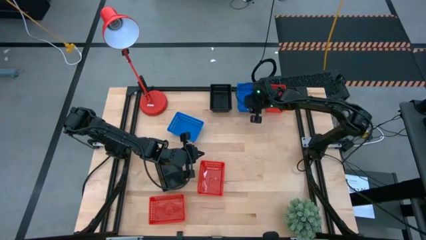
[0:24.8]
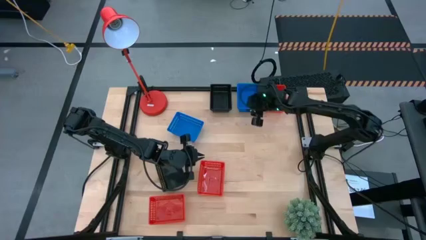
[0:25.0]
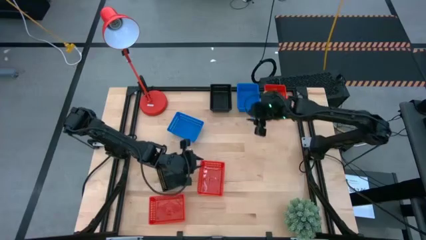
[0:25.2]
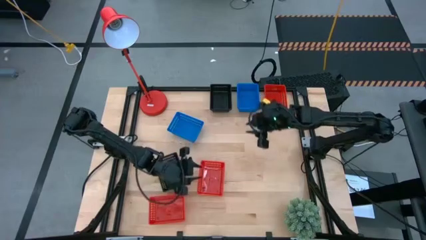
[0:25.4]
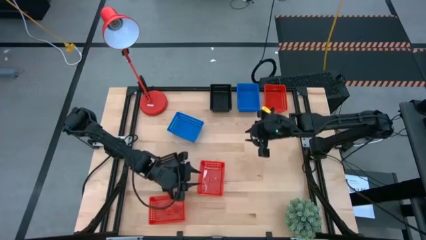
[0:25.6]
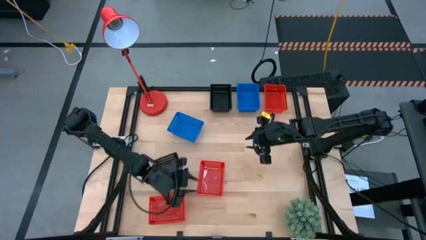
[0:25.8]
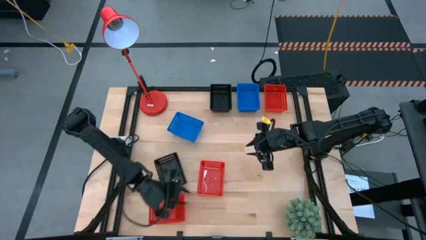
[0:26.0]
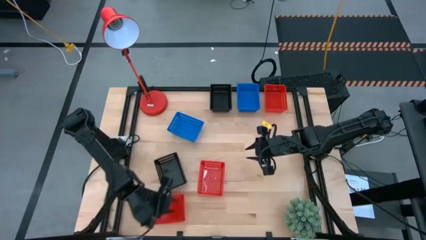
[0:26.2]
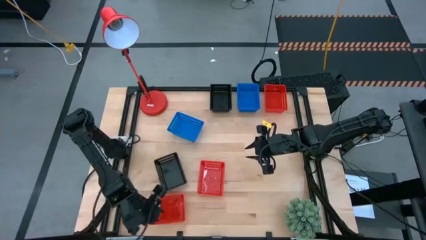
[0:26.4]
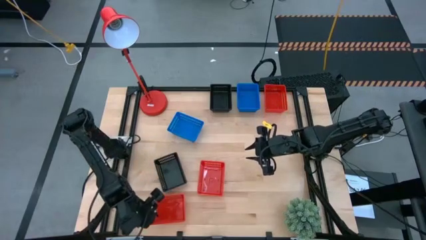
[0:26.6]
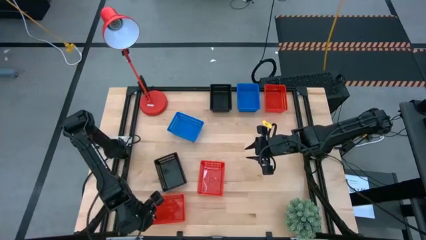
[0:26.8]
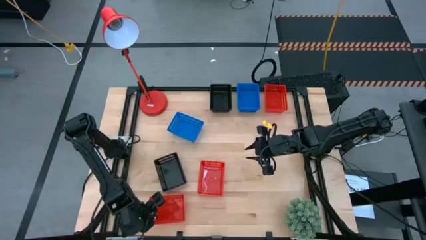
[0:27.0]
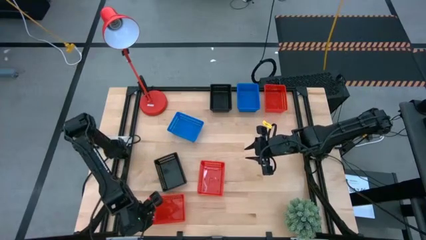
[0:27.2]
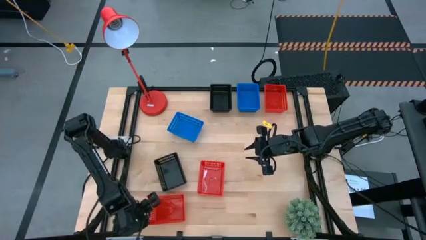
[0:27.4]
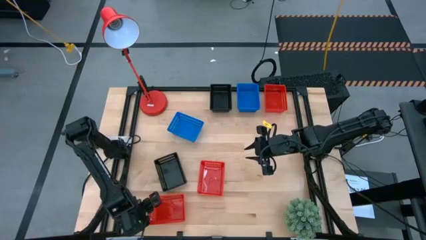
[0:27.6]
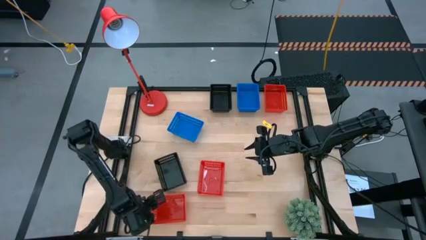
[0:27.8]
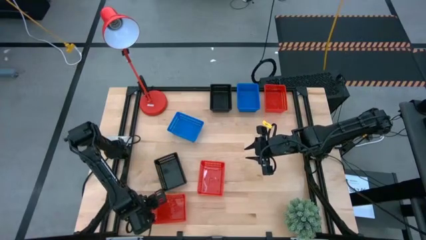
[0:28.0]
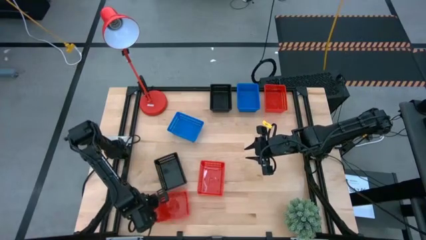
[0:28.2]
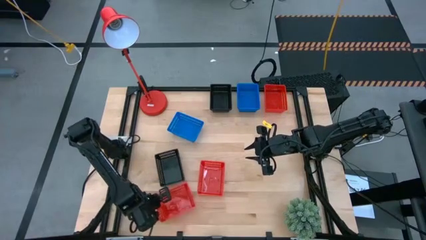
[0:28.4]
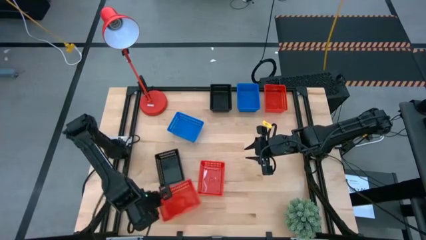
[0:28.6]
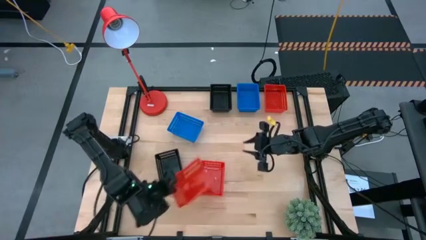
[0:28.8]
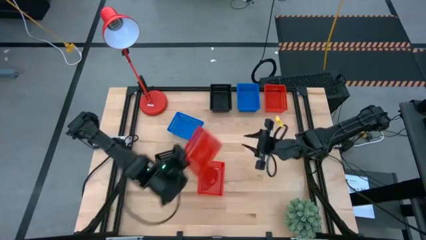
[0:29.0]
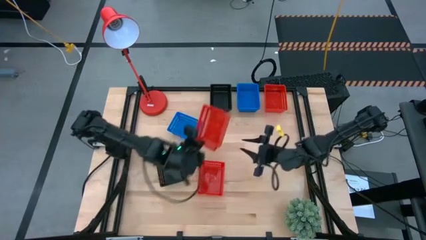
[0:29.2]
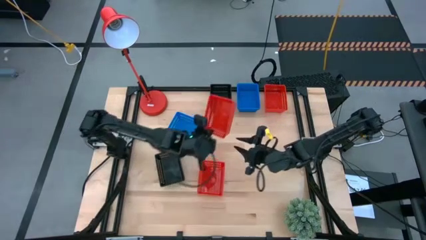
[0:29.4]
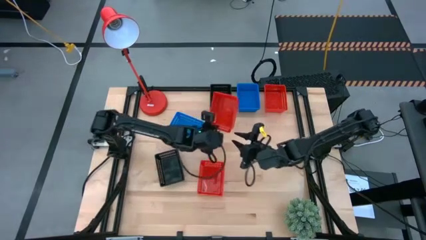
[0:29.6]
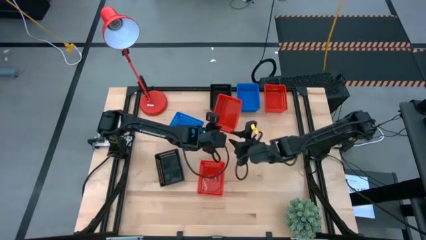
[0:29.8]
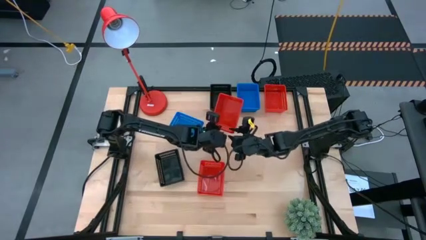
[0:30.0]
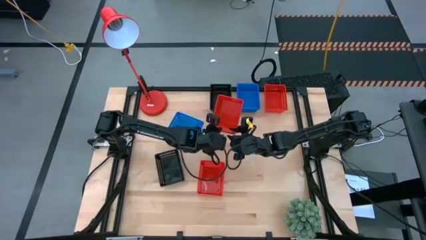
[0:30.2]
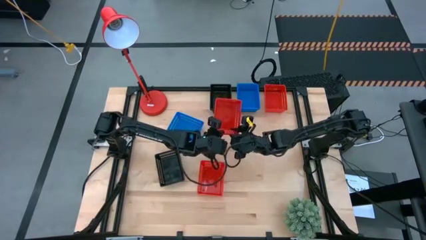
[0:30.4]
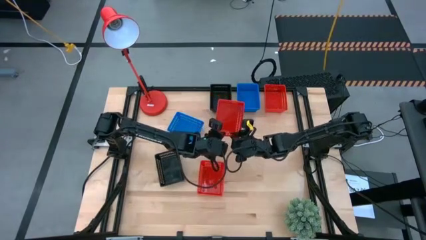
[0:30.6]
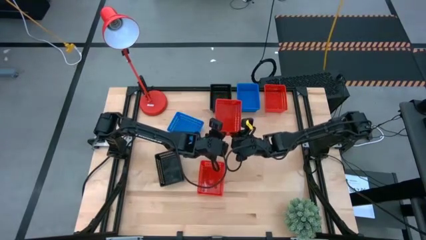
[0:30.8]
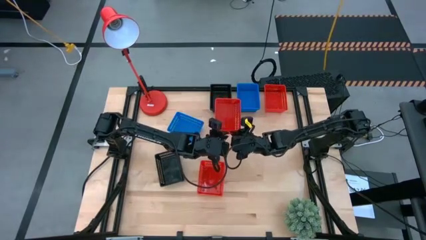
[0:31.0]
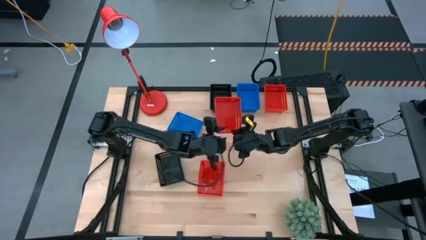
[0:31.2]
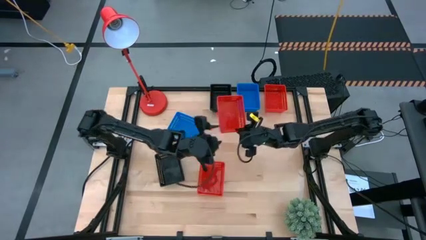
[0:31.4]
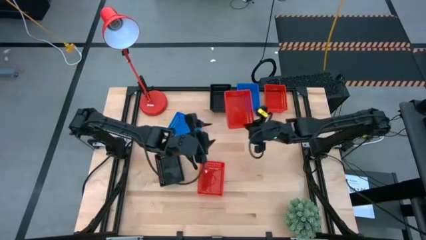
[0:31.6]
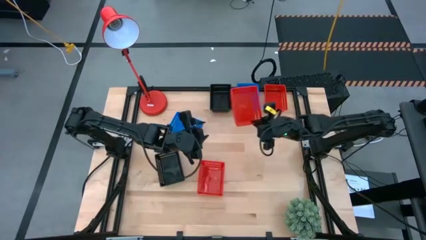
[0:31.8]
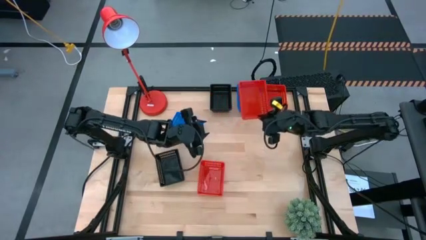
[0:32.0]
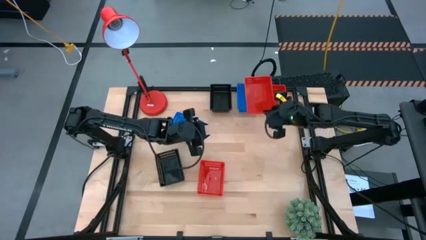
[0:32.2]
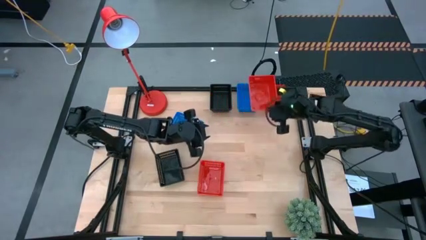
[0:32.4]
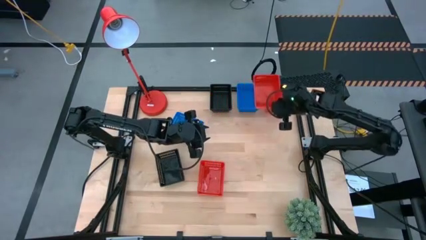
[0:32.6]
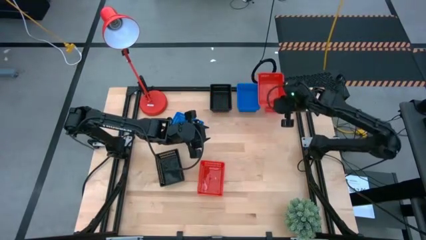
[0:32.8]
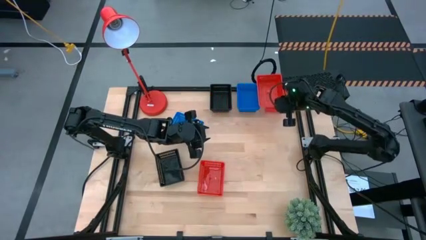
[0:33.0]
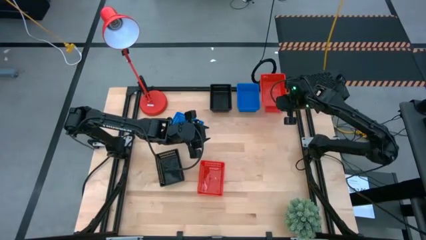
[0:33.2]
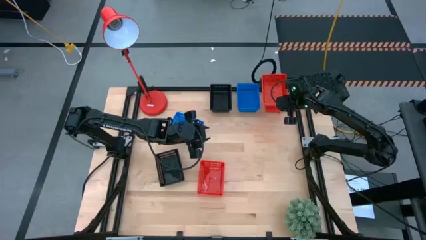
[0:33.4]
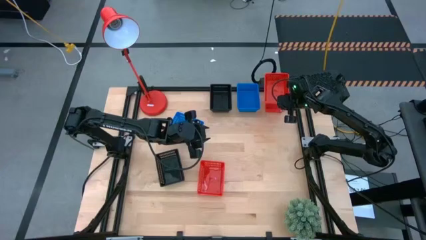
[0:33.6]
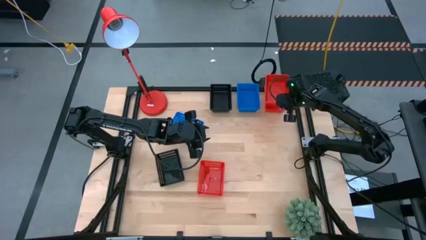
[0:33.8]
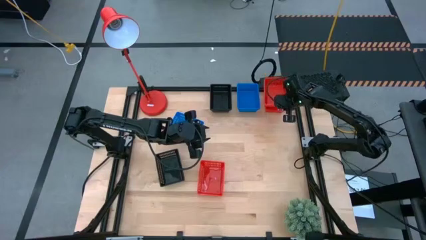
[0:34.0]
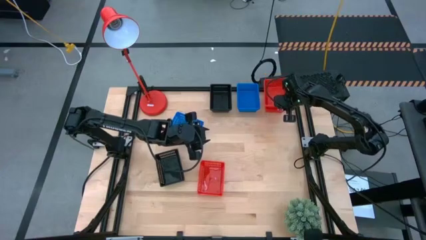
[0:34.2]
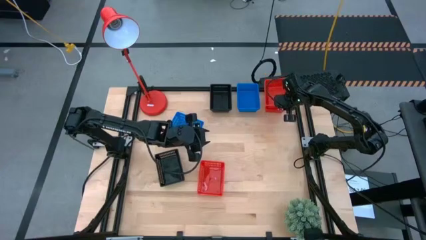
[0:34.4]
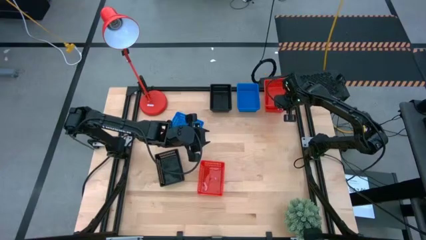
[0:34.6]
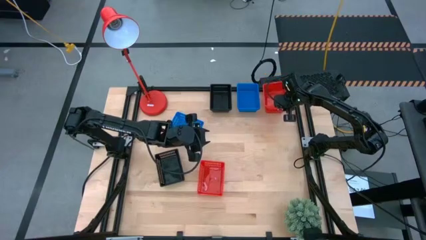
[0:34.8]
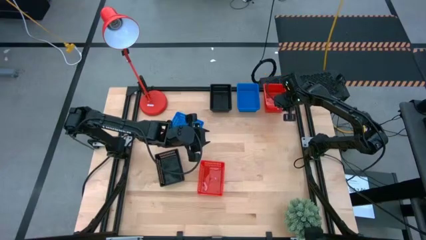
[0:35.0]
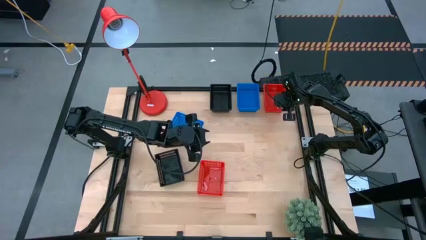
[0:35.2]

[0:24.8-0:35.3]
Stack the bottom red basket on top of the top red basket

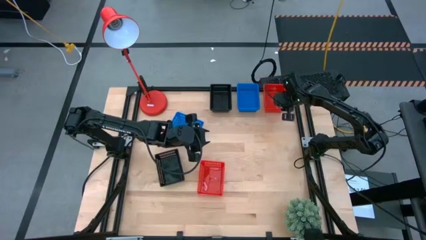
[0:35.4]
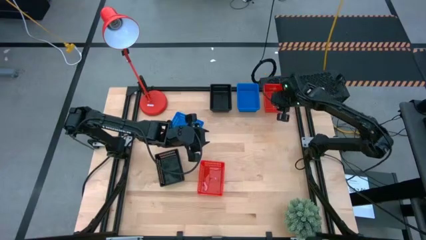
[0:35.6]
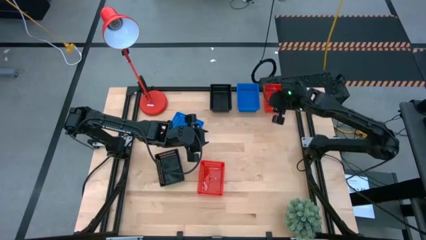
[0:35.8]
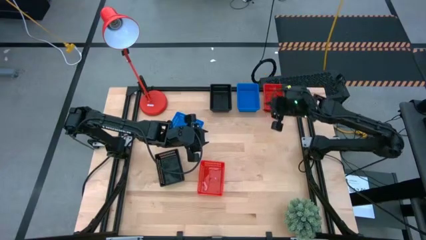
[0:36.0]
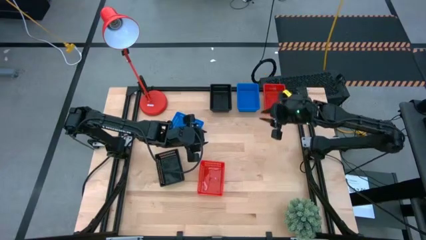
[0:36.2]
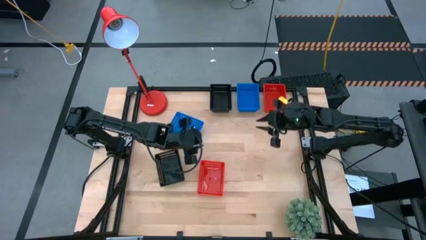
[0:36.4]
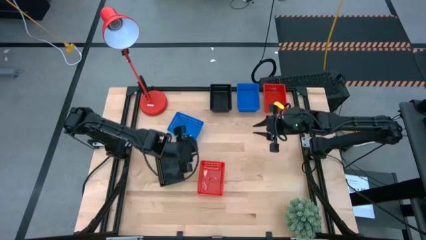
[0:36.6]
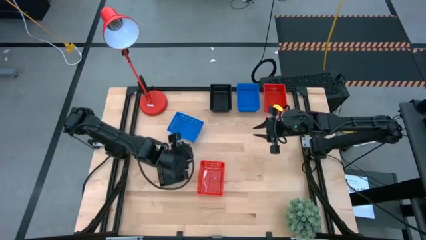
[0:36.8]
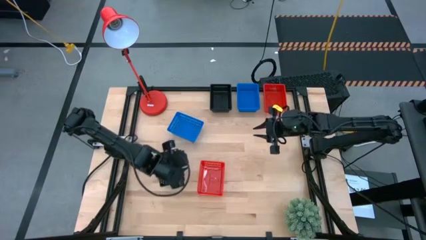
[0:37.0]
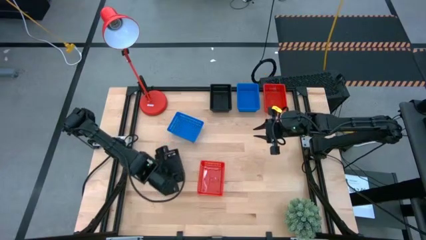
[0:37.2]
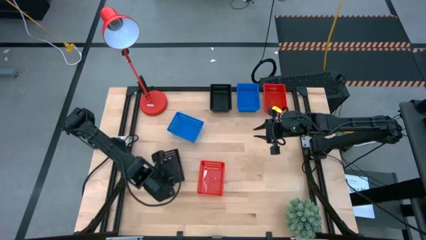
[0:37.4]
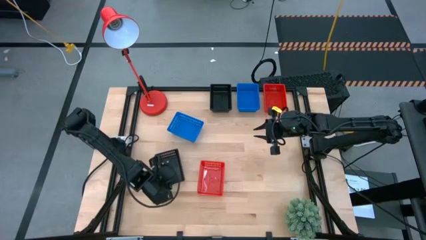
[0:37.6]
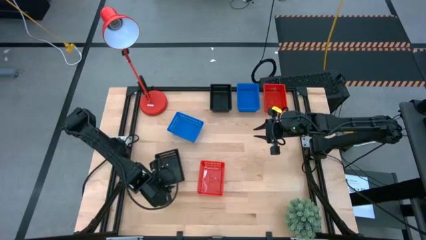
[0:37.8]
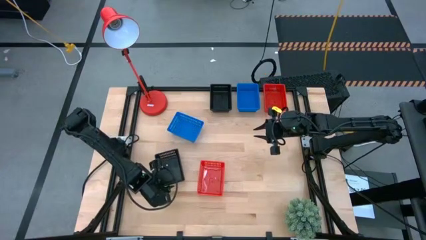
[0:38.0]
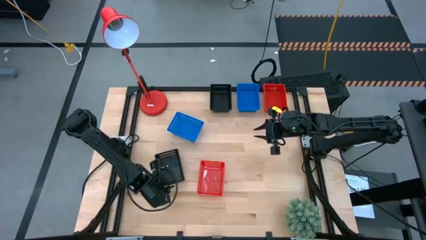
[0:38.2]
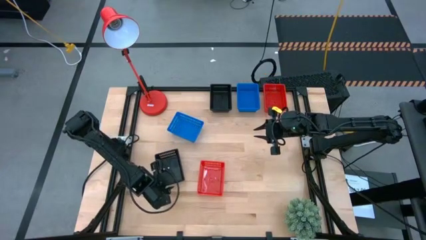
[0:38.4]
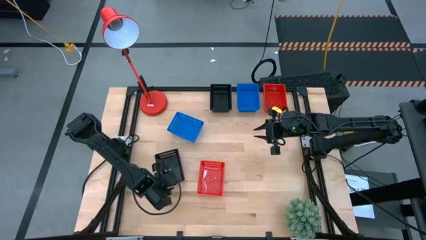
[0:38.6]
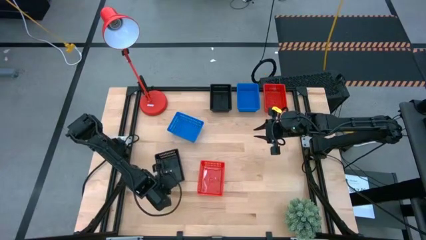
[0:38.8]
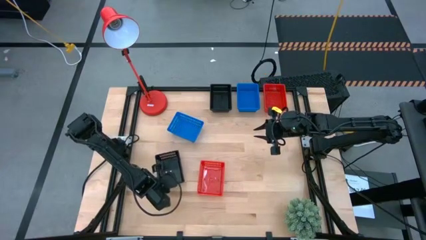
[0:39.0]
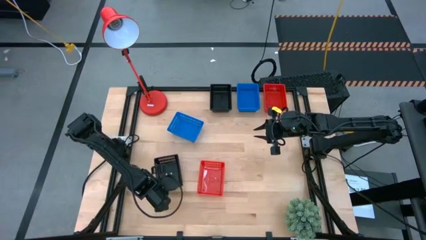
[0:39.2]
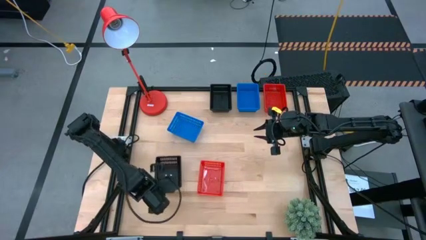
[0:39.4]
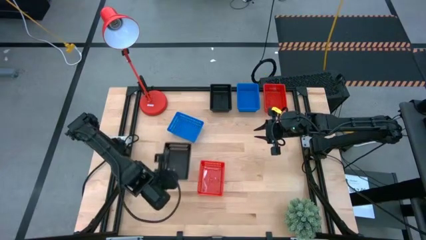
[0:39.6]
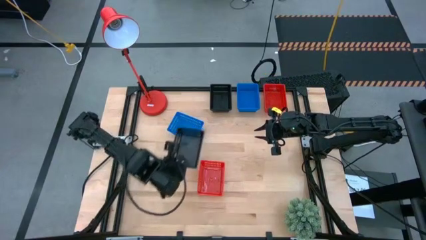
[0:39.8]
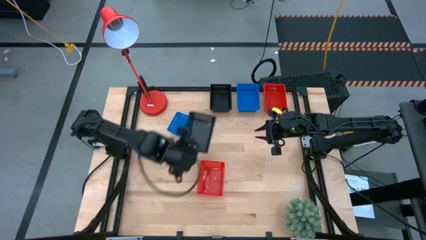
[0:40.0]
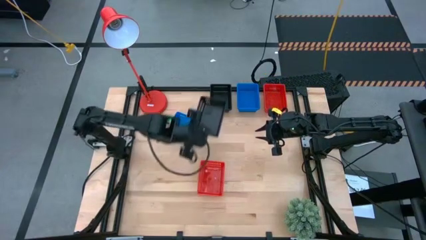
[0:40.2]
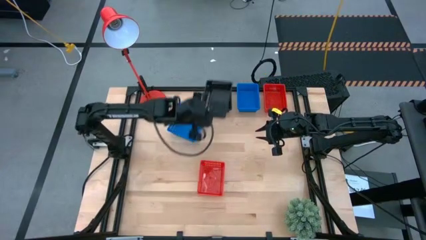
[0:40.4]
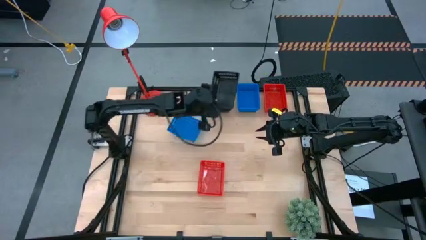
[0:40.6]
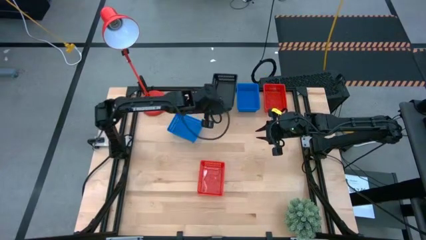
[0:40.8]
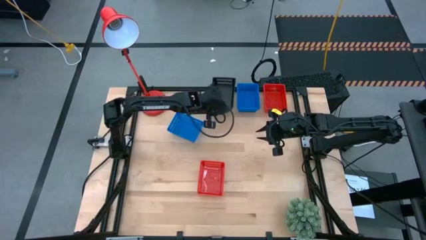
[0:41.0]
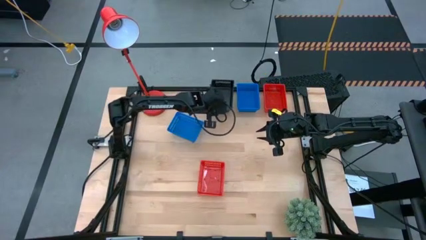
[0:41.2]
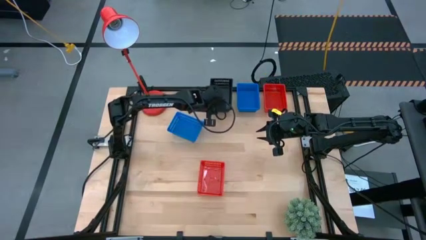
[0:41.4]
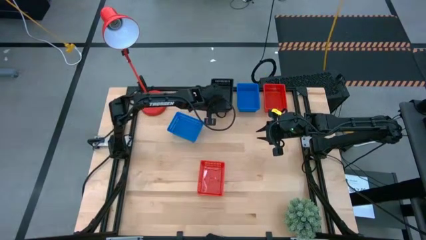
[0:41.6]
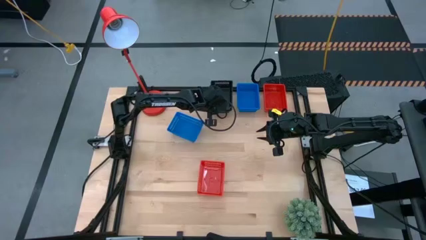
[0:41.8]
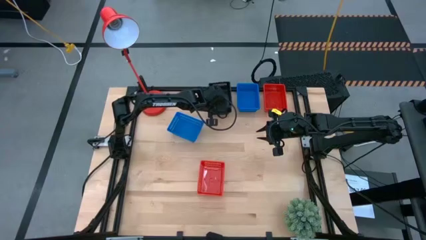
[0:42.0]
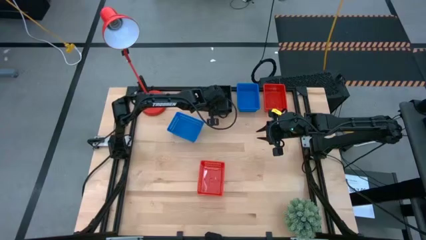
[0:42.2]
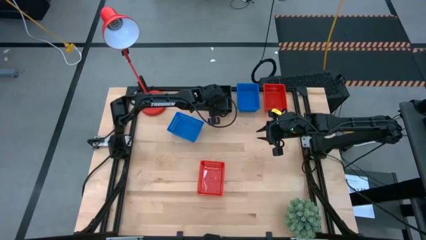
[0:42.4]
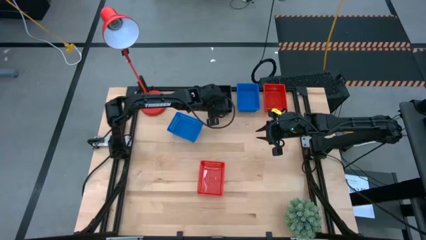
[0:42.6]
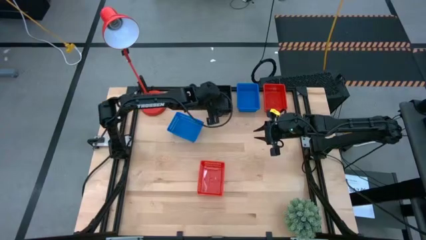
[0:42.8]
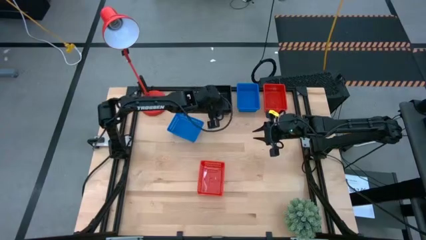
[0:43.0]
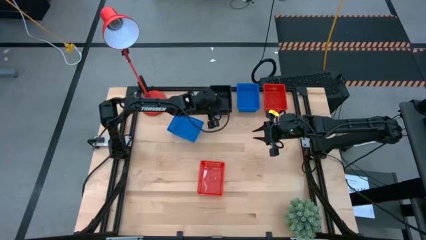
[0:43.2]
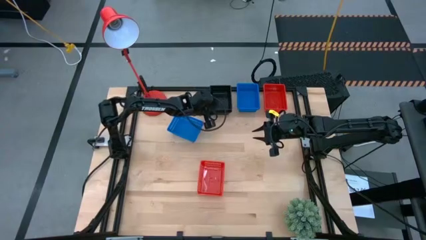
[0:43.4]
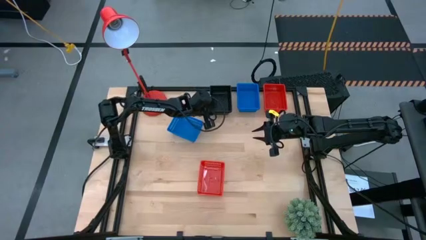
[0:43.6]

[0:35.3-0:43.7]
Stack the bottom black basket on top of the top black basket
